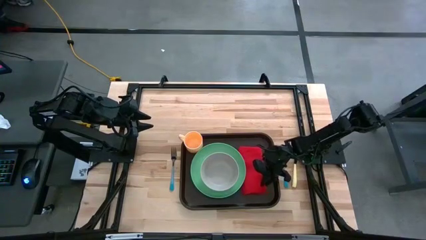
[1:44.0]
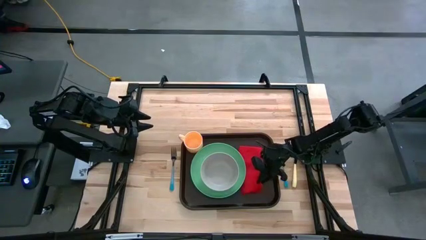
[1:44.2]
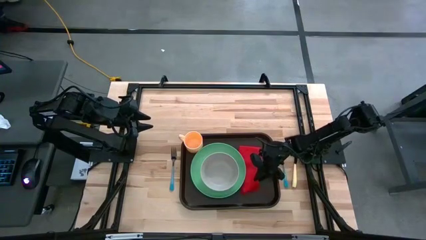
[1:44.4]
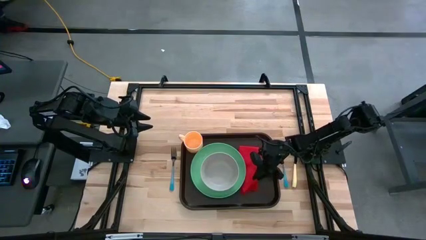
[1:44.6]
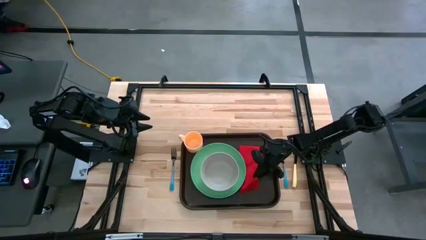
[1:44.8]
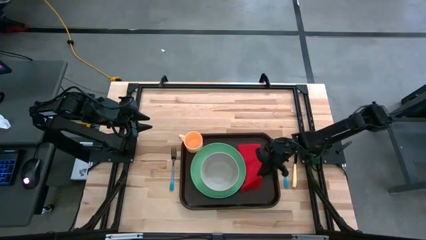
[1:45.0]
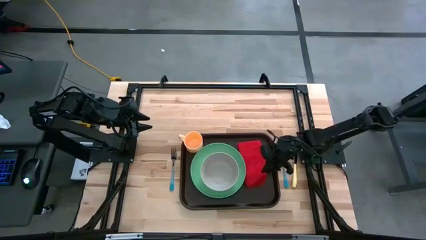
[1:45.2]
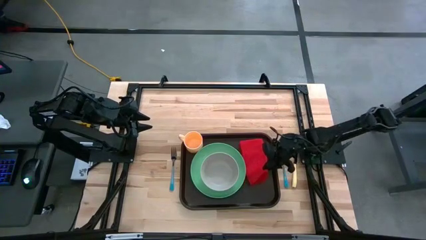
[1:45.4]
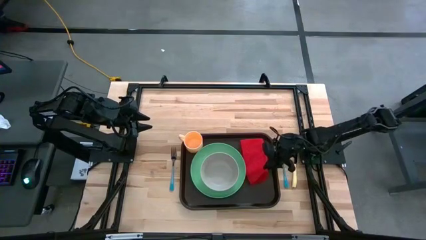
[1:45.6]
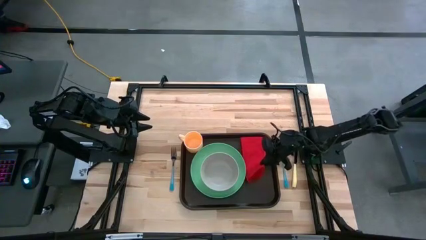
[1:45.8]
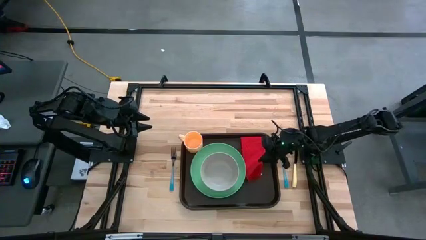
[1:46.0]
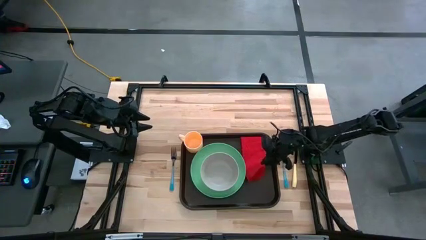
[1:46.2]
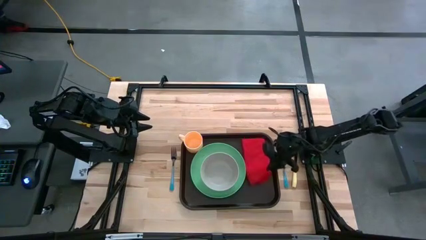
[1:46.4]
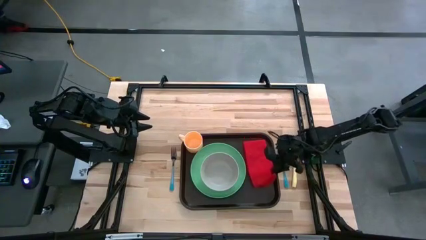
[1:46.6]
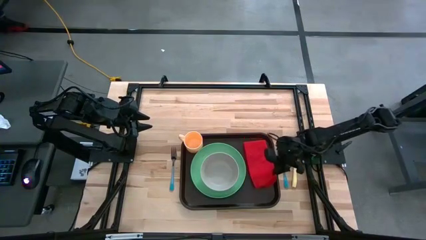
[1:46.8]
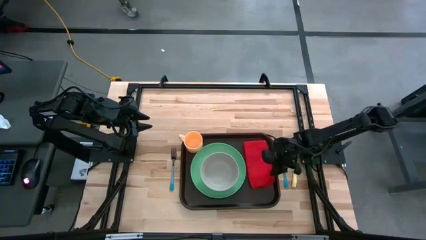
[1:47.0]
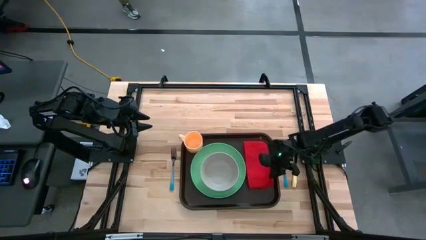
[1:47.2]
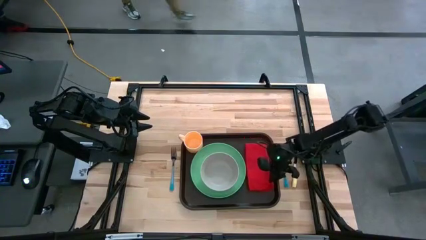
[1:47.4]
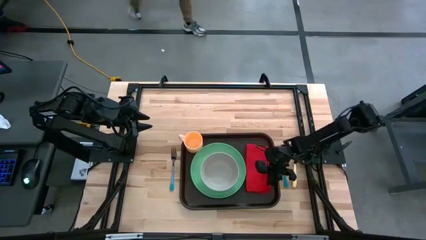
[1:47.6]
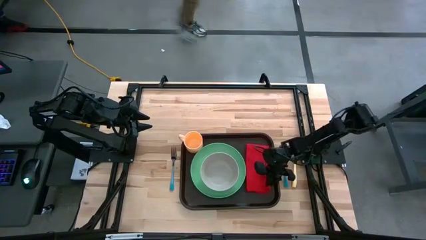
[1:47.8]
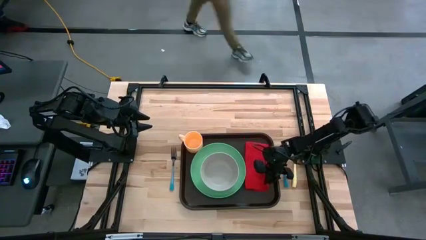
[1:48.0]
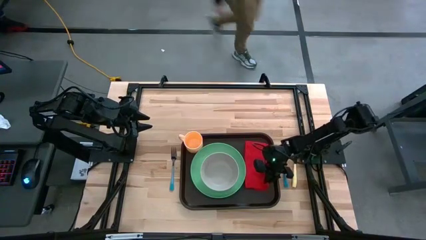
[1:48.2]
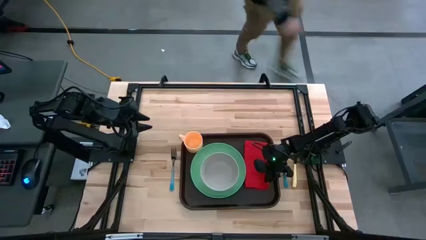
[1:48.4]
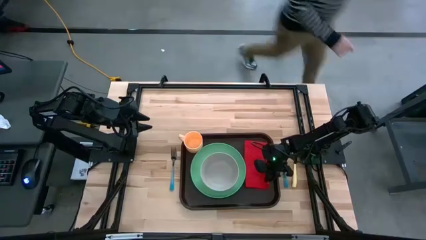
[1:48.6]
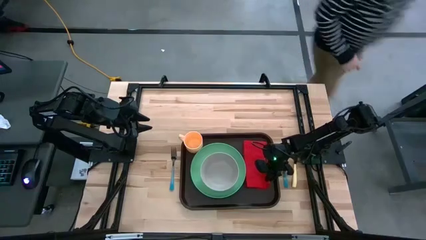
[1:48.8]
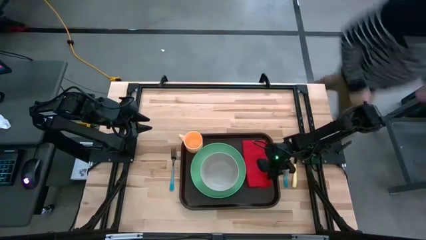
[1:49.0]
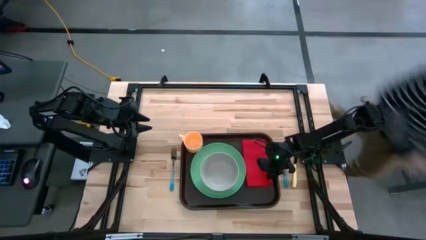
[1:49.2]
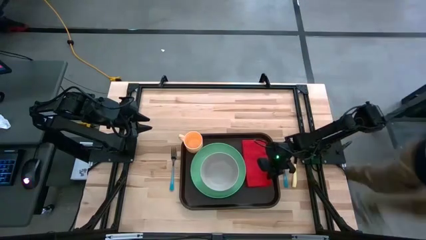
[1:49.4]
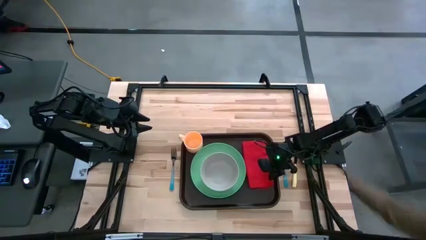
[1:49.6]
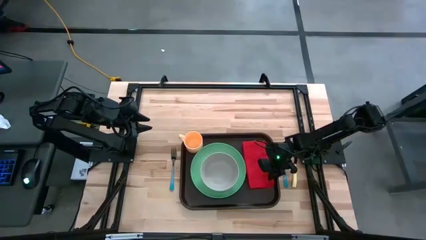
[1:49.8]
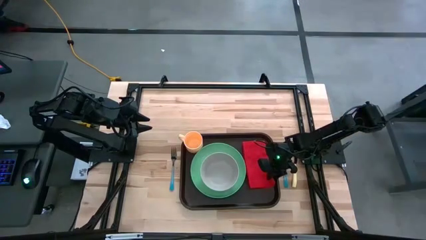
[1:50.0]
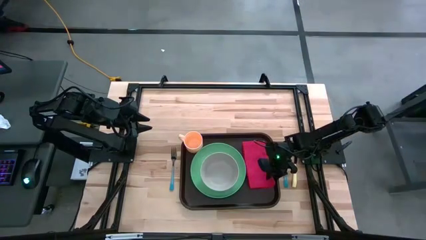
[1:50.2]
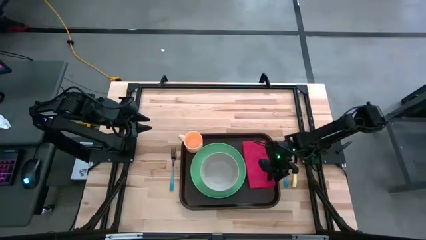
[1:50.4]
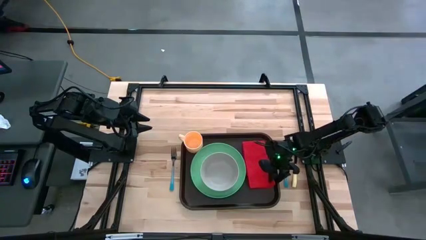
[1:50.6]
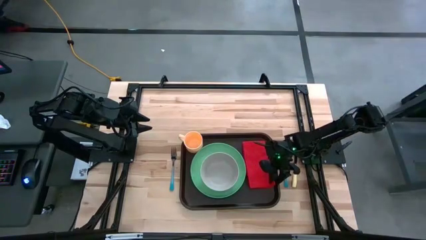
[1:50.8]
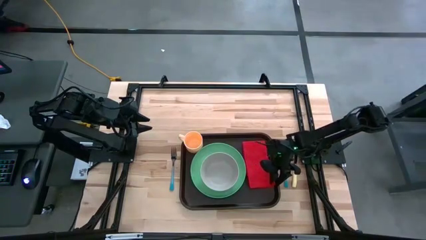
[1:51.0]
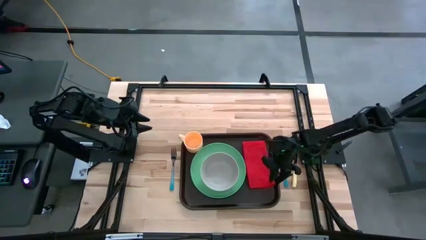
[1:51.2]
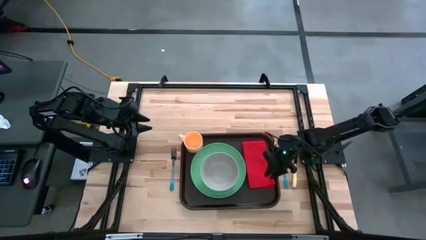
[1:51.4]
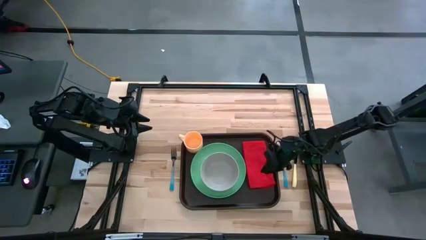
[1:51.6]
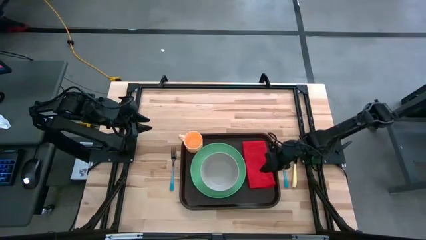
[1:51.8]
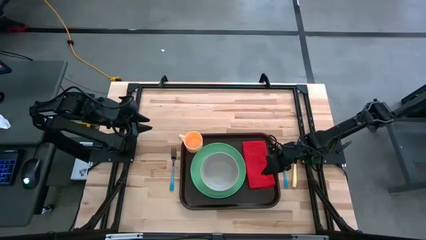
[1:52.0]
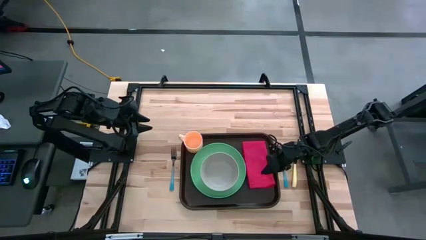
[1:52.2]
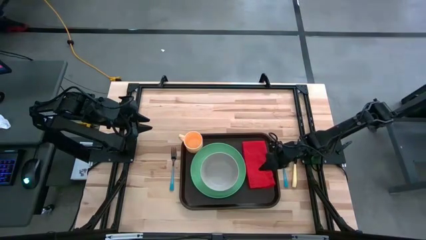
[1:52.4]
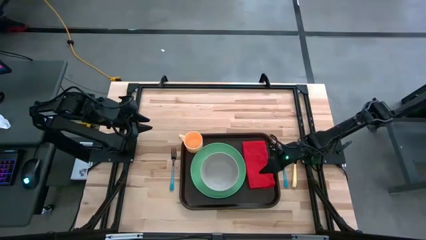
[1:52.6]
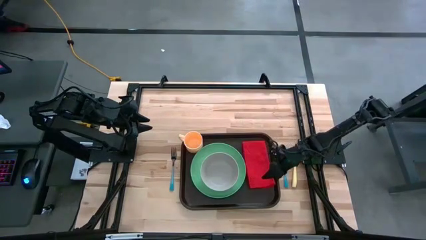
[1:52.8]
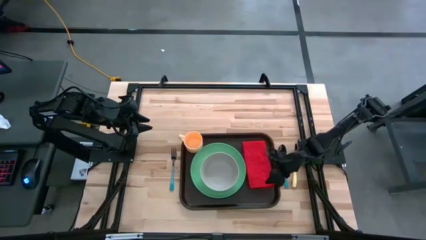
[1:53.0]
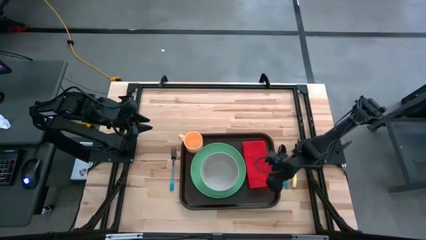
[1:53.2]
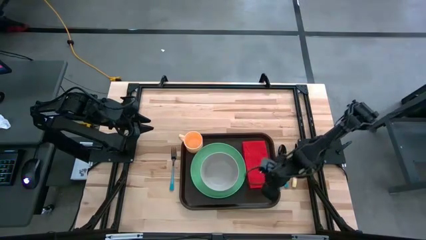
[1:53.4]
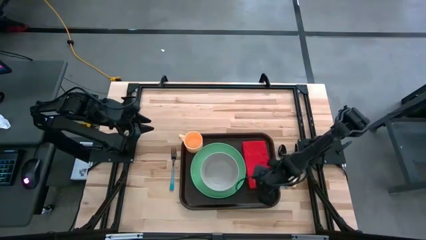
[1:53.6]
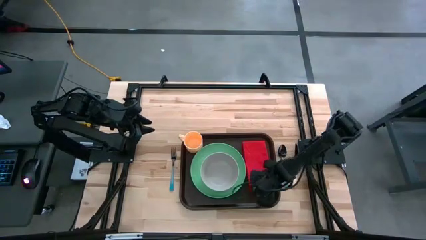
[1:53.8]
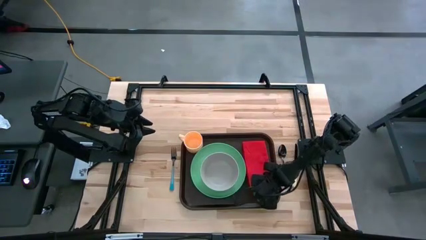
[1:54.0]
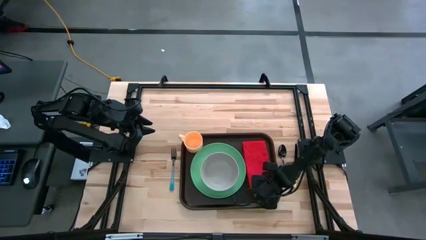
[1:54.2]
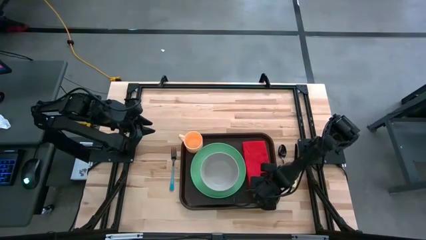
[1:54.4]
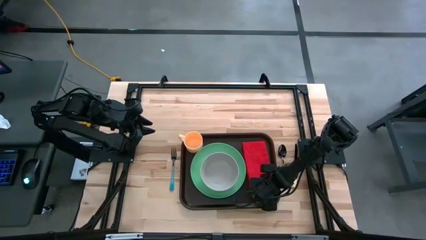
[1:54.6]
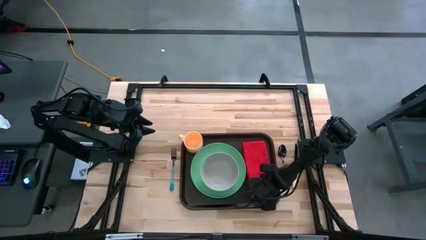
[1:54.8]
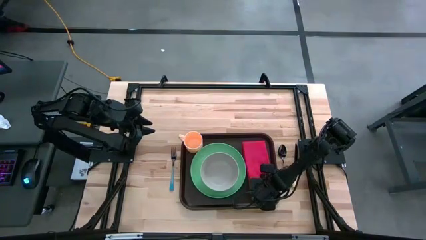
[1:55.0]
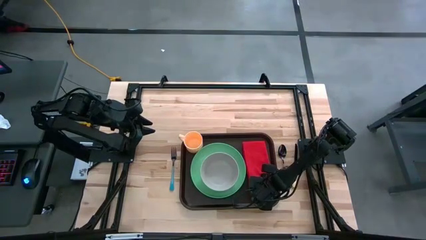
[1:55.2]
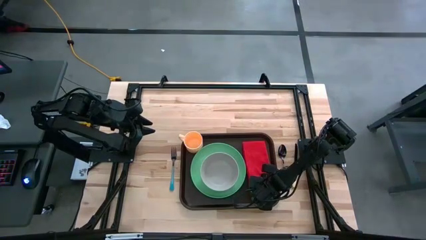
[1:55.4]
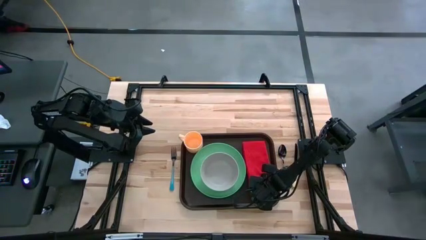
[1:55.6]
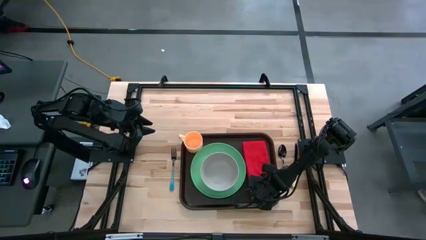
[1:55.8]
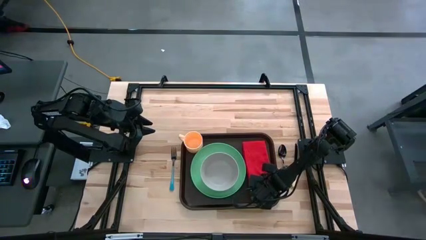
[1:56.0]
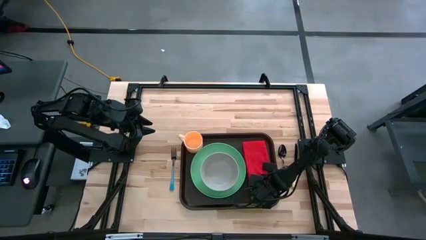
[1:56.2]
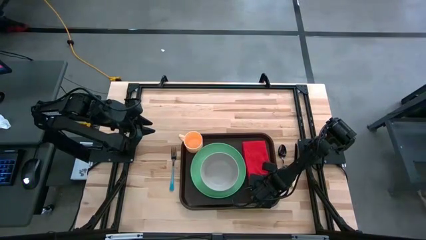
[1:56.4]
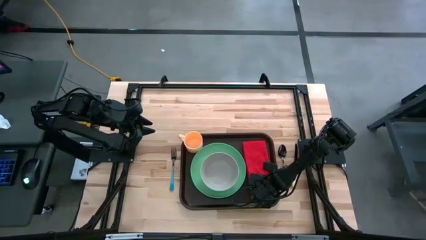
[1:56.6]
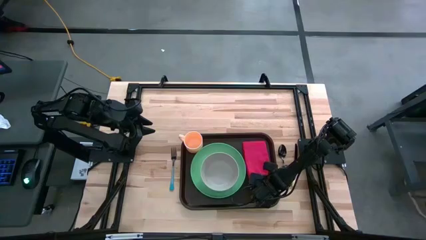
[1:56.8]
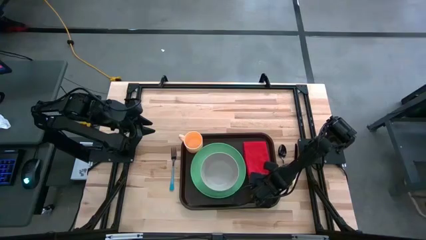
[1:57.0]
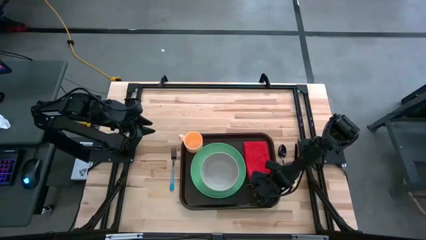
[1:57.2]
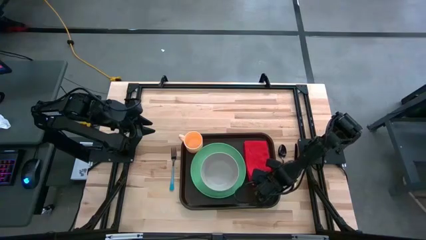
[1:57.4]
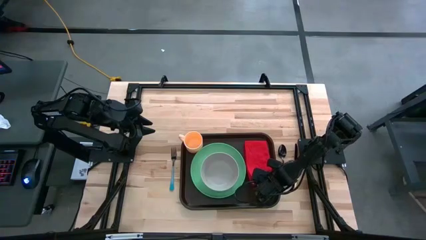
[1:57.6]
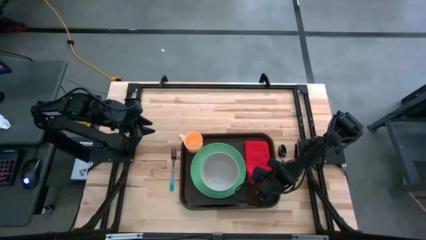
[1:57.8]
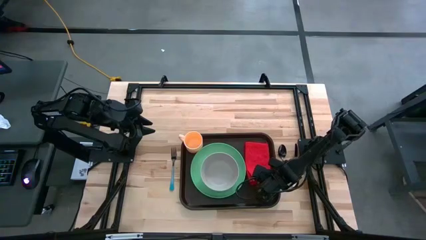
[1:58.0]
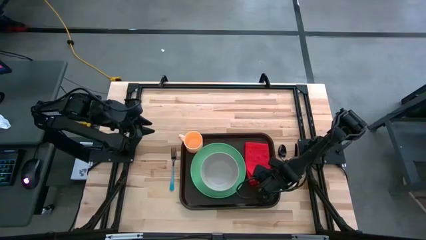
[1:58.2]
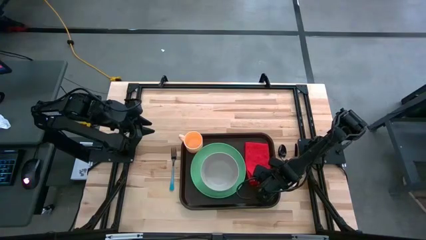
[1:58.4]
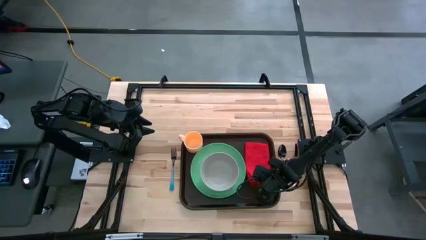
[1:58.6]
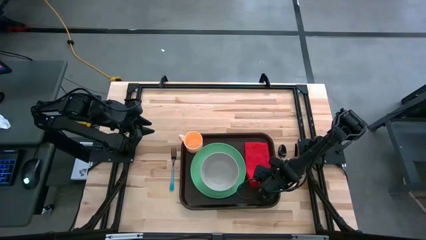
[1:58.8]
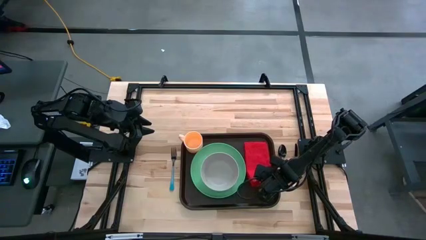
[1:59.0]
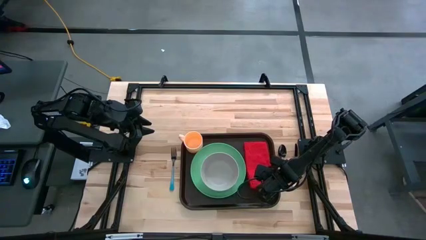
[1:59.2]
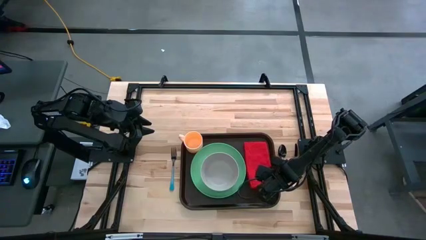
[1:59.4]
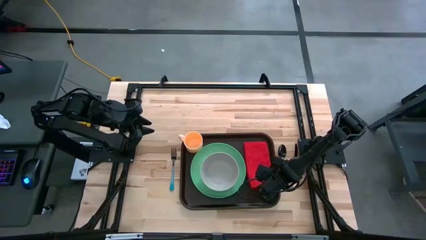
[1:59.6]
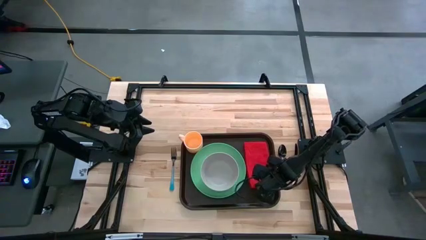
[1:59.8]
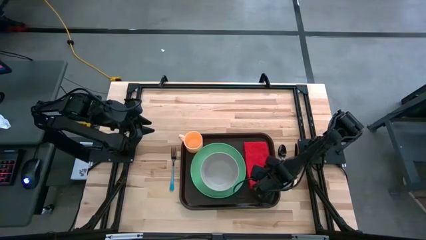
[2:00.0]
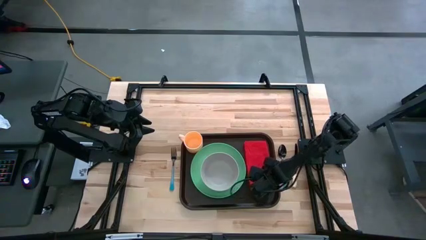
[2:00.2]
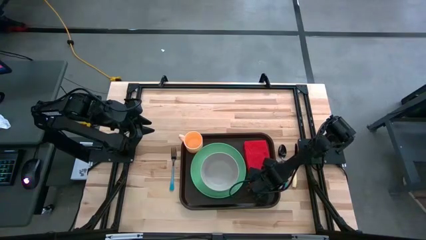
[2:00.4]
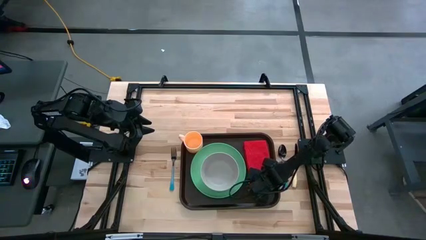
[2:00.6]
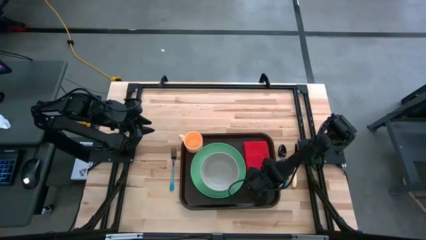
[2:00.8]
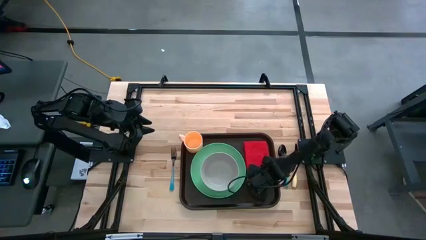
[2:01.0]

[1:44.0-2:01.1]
Task: Set up tray
Put the red table napkin beside the plate on the brown serving tray
